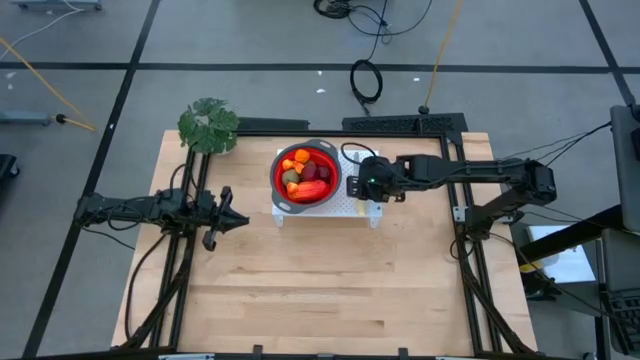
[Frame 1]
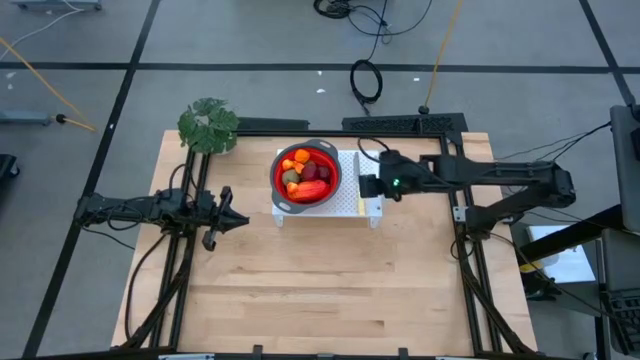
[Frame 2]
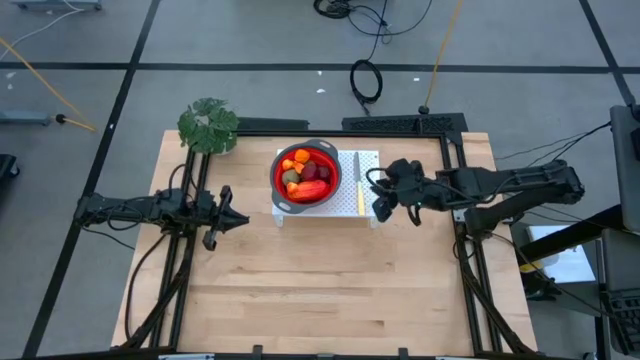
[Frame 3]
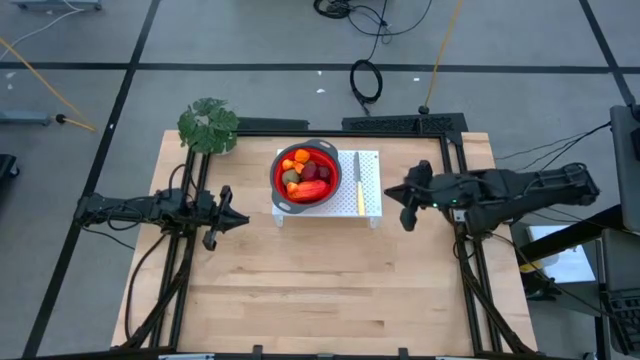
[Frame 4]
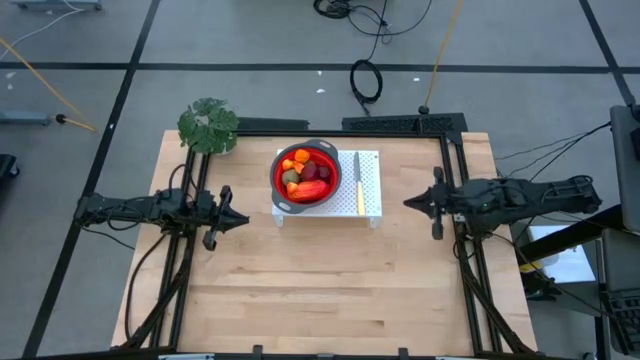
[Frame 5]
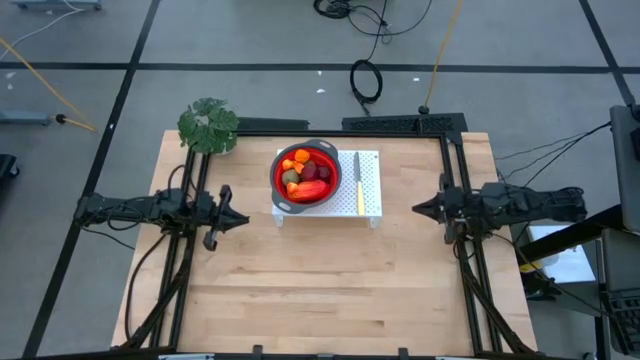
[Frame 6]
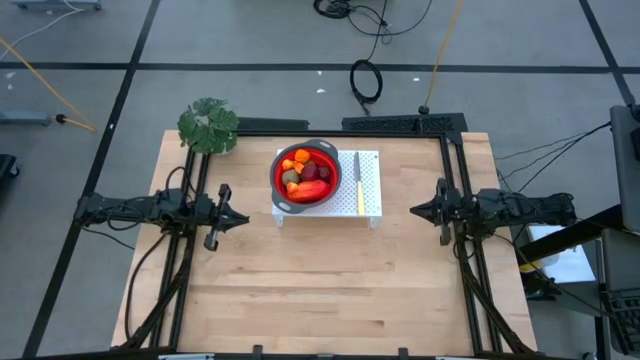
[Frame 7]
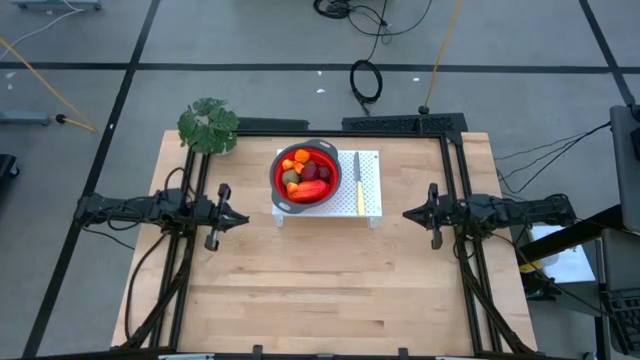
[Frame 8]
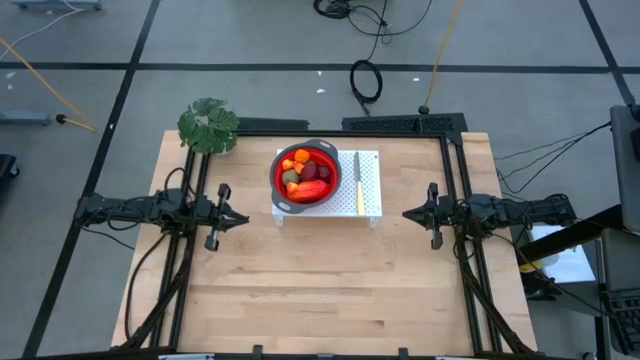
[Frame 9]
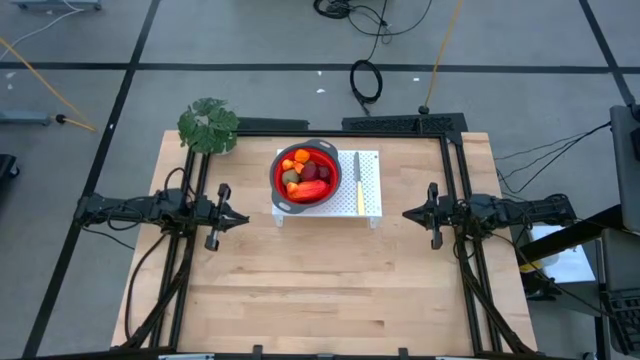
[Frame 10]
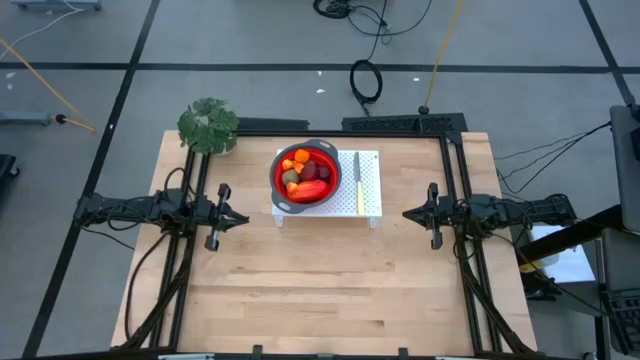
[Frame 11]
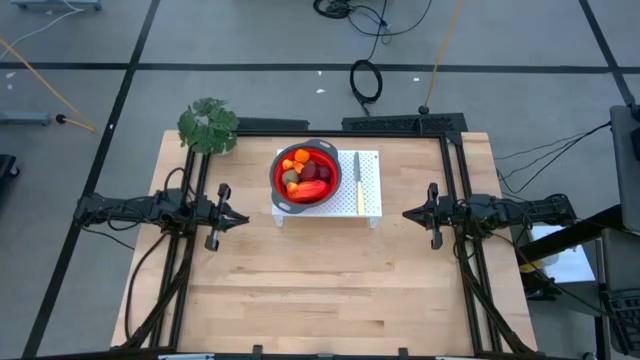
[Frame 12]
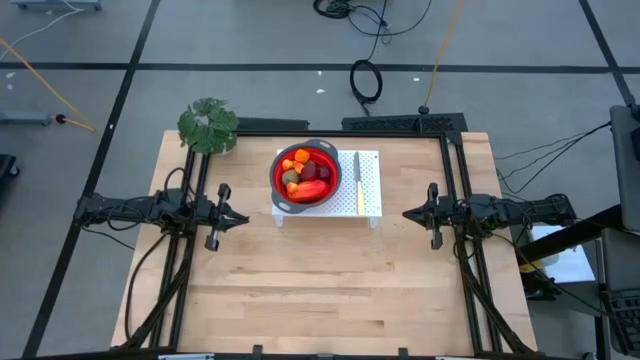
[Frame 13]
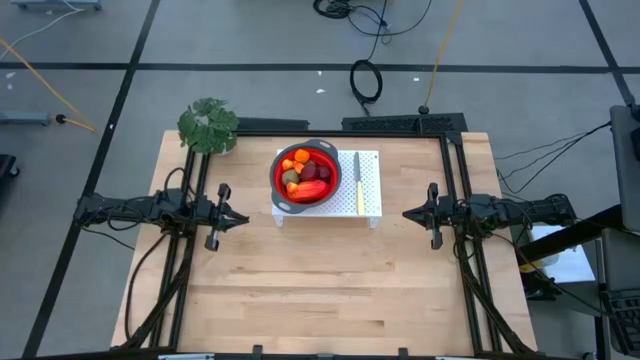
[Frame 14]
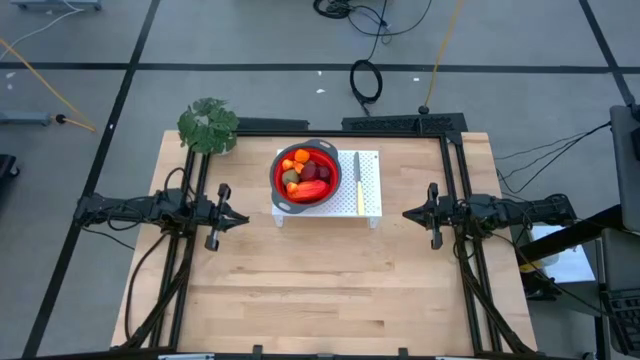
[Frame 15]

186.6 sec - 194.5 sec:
Task: Pick & Place Fruit
Return To Home position

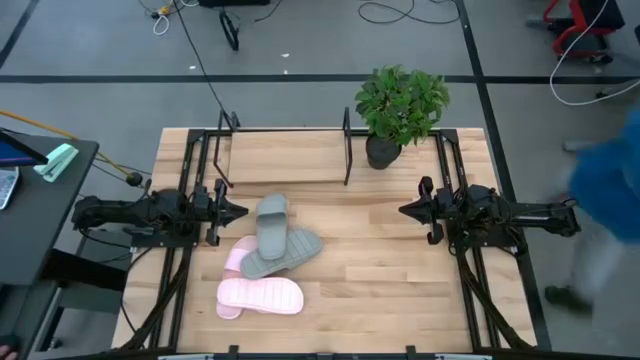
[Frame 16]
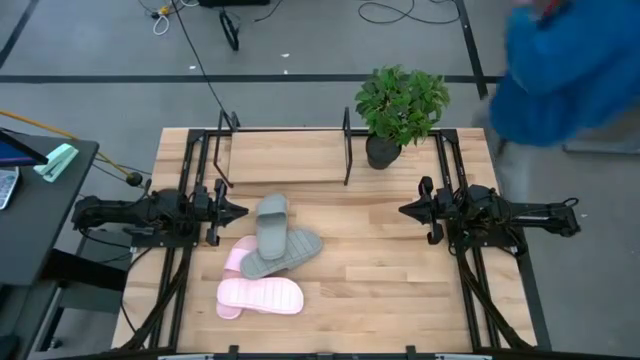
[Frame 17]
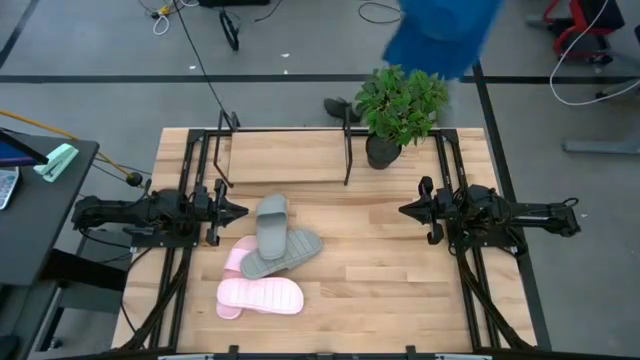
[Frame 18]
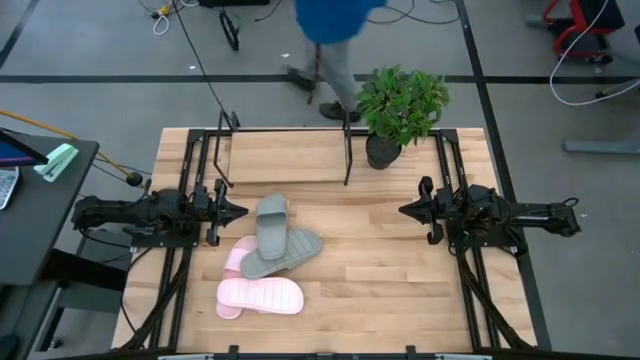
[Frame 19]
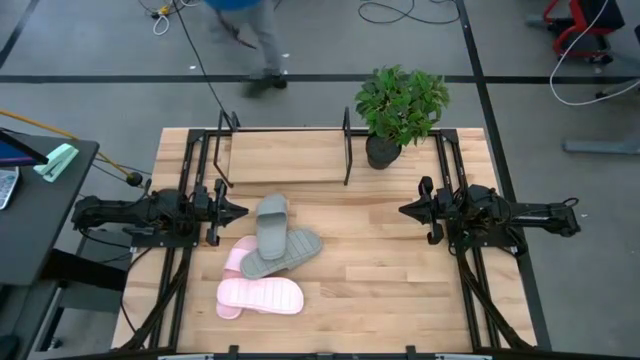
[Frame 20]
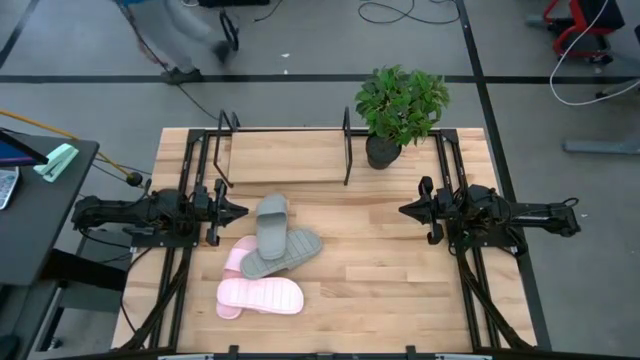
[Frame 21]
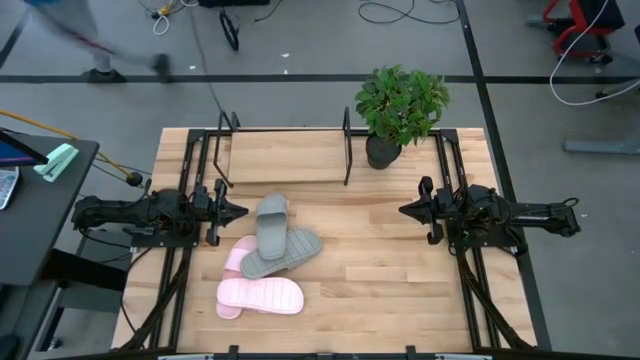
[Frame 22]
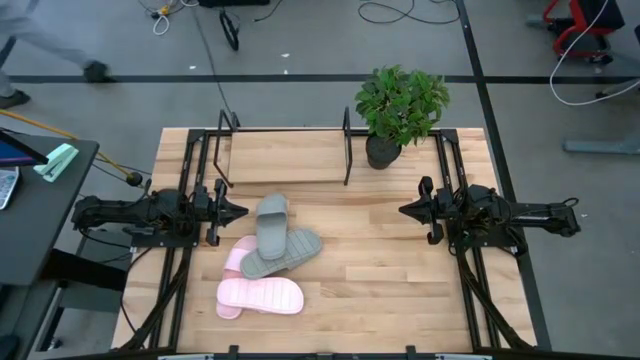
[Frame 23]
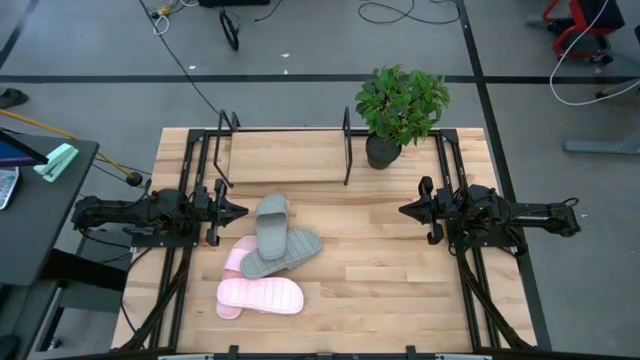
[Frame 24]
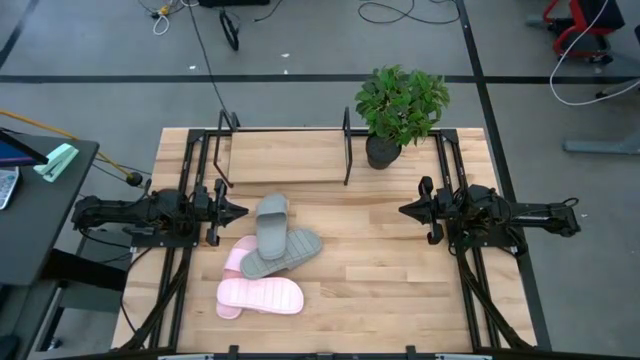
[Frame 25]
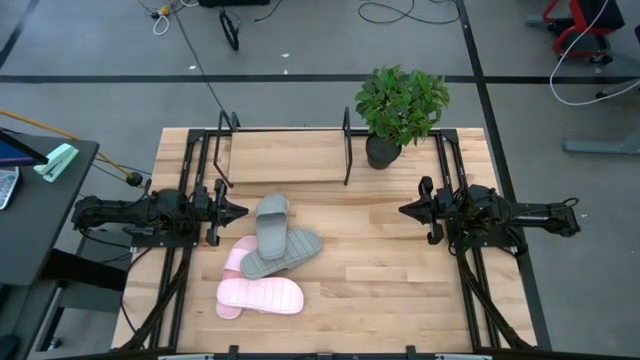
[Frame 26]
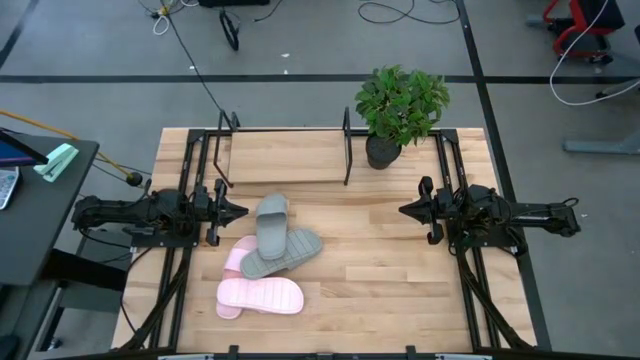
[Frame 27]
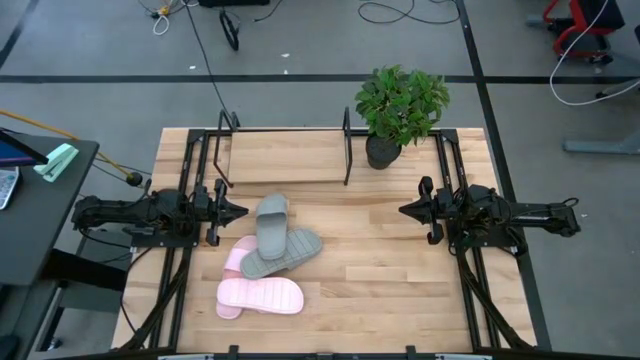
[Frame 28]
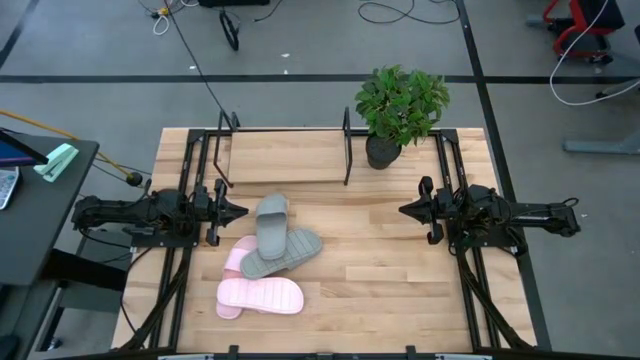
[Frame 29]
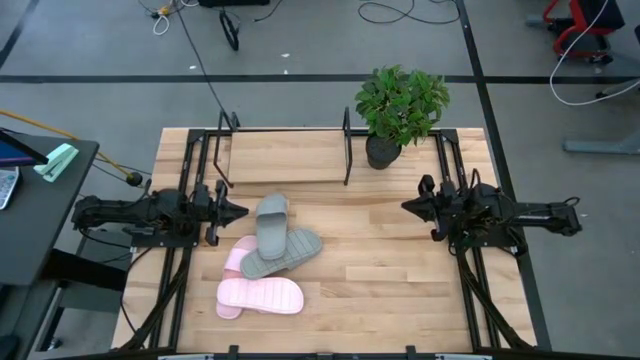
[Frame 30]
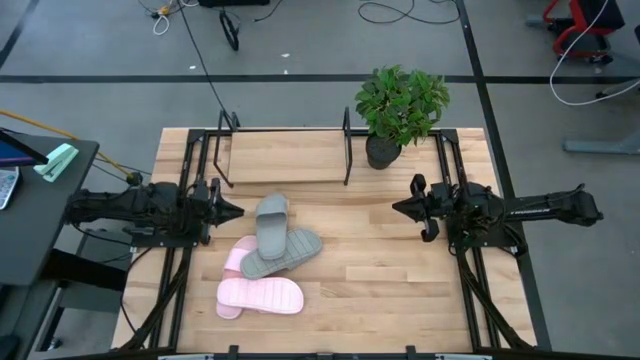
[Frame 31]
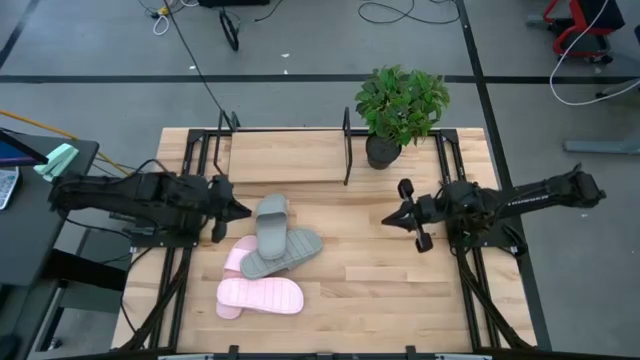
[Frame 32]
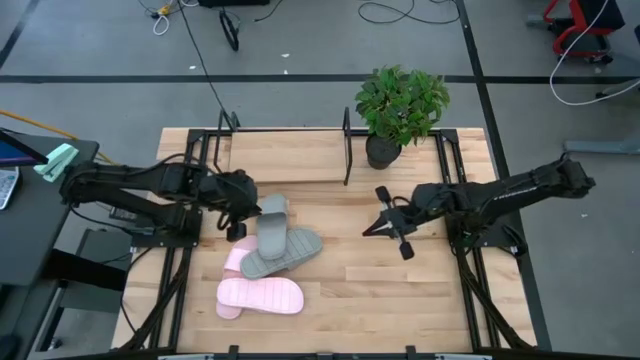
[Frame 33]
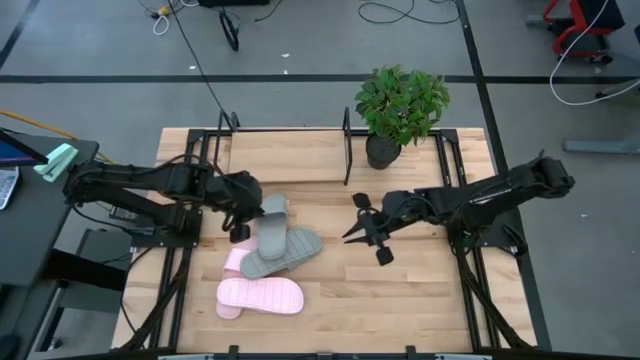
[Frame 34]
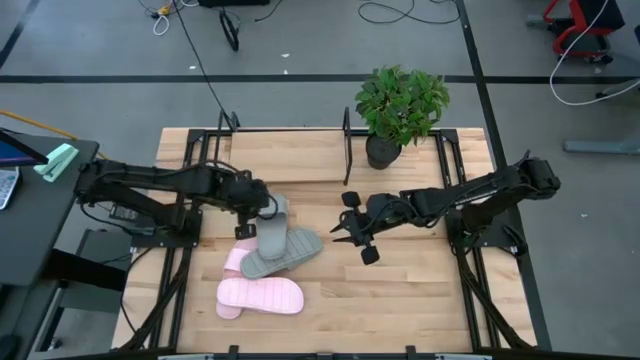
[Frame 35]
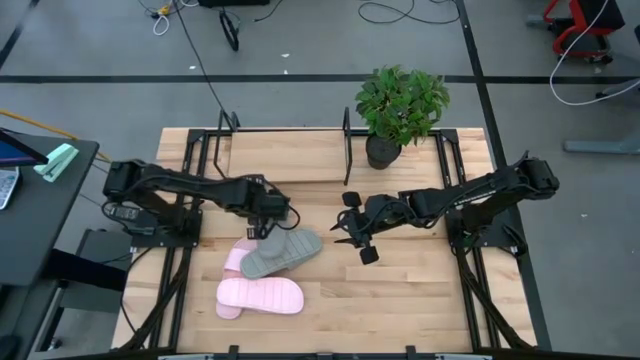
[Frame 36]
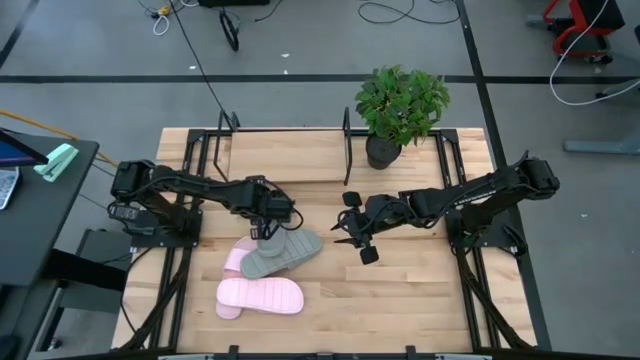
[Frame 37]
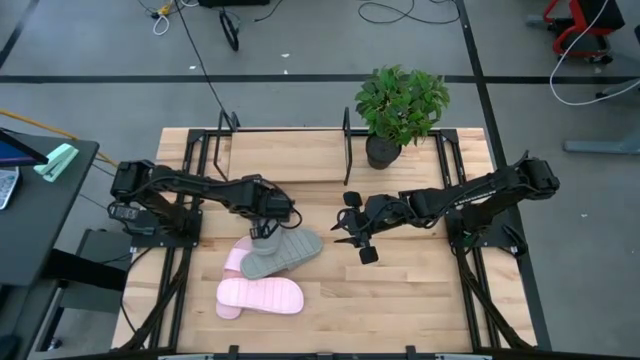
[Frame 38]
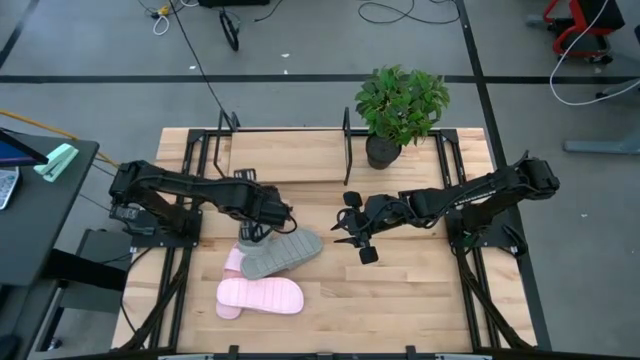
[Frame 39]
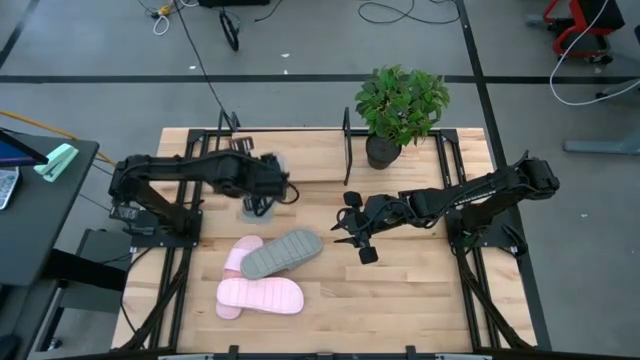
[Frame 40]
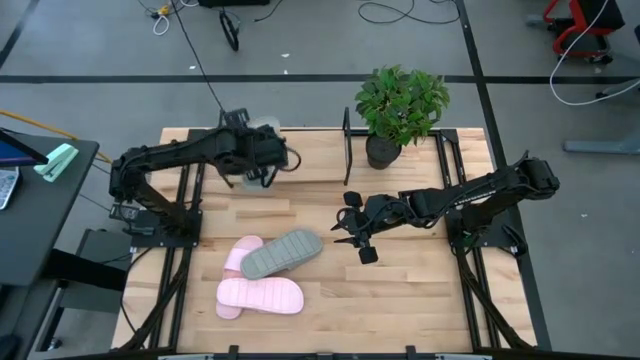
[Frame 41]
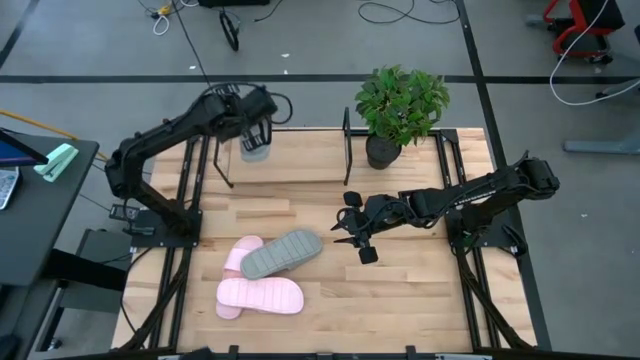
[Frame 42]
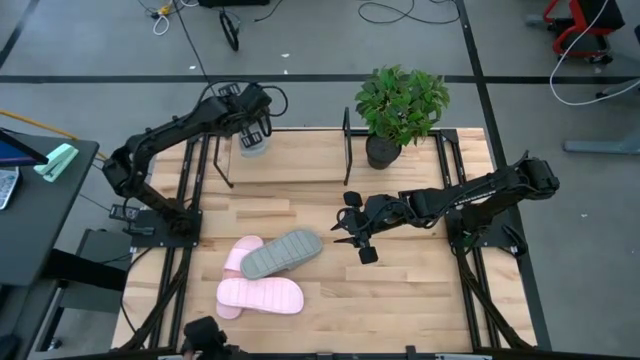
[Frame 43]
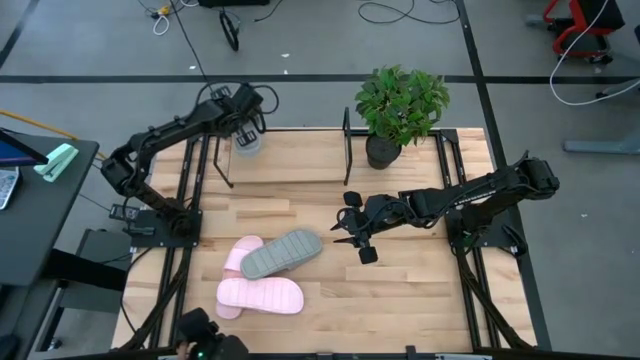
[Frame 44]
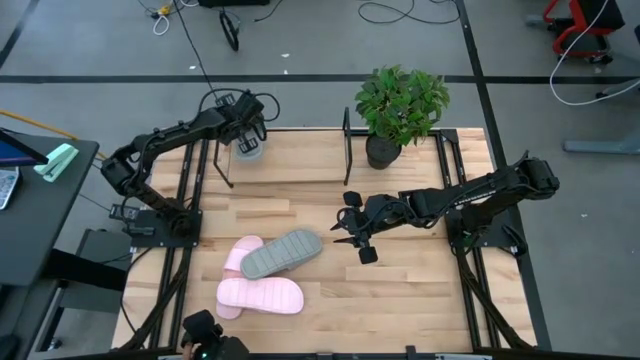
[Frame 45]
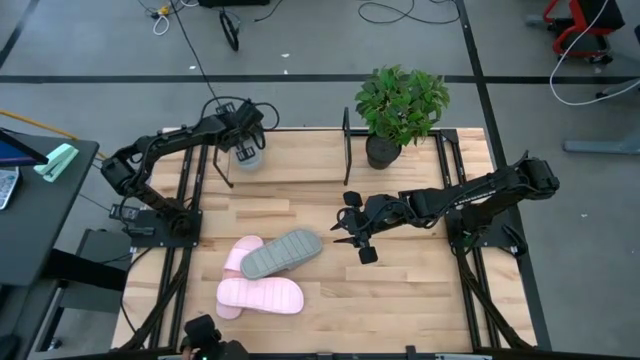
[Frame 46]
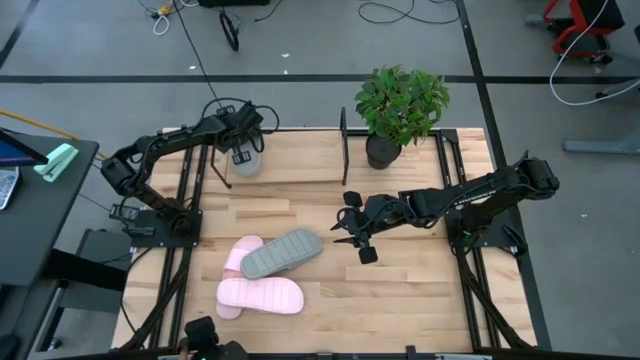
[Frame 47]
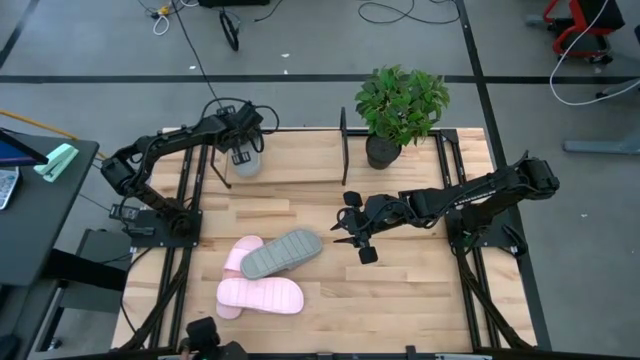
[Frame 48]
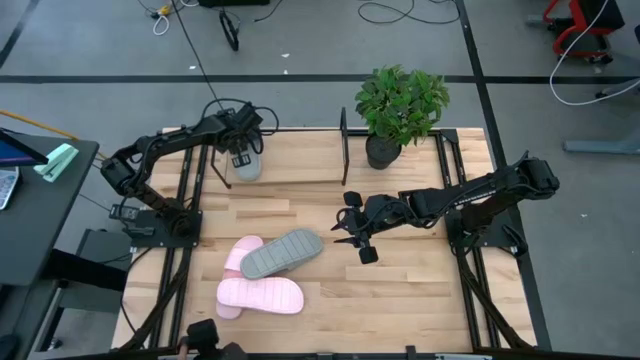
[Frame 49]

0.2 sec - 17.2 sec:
Task: Pick and place slides into the shelf
Put the top gray slipper on the shelf
